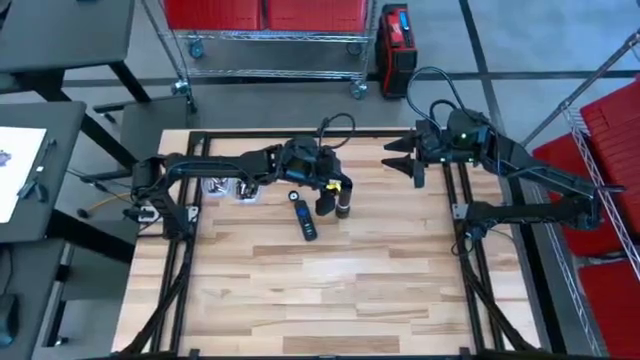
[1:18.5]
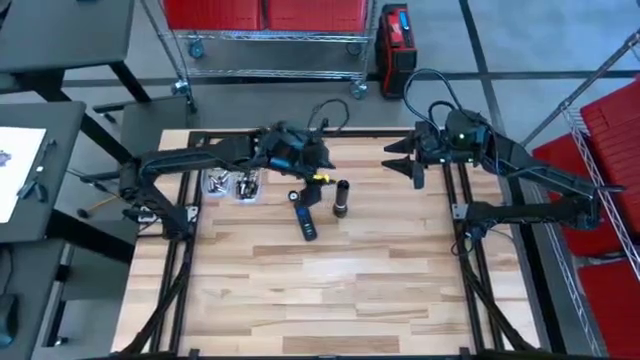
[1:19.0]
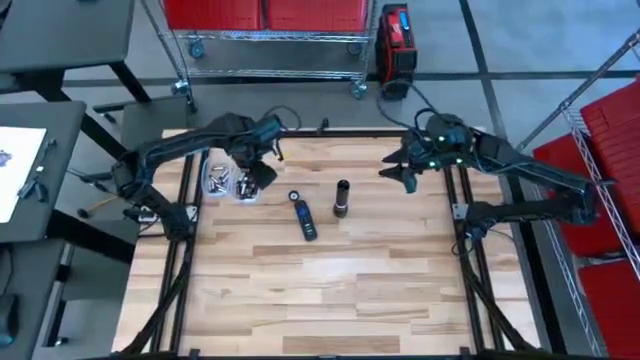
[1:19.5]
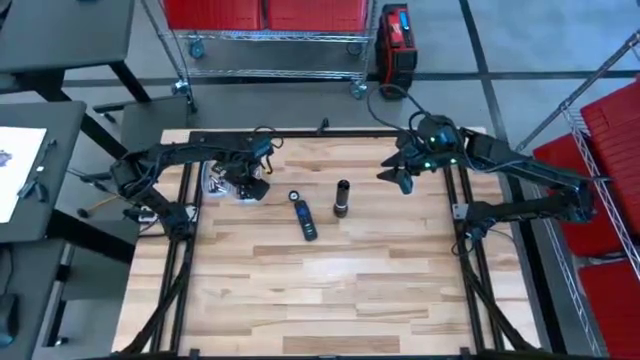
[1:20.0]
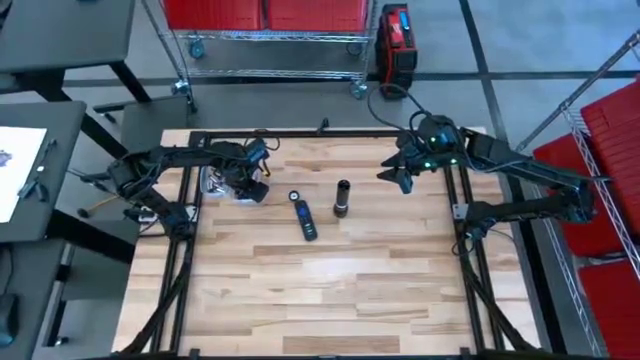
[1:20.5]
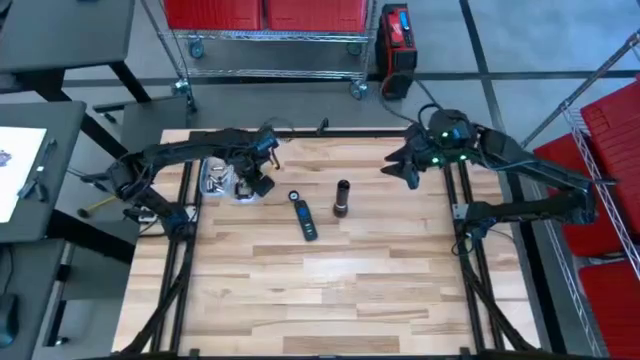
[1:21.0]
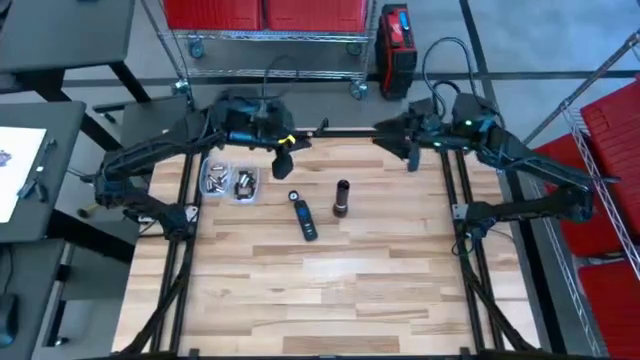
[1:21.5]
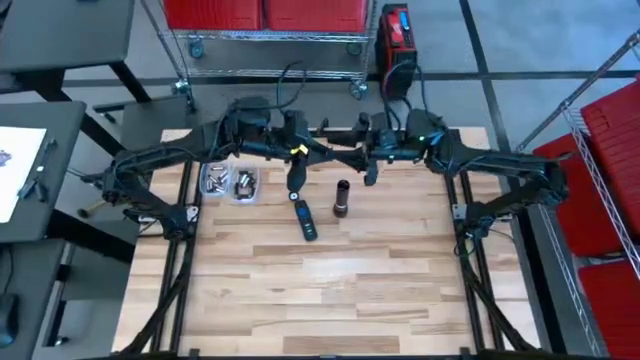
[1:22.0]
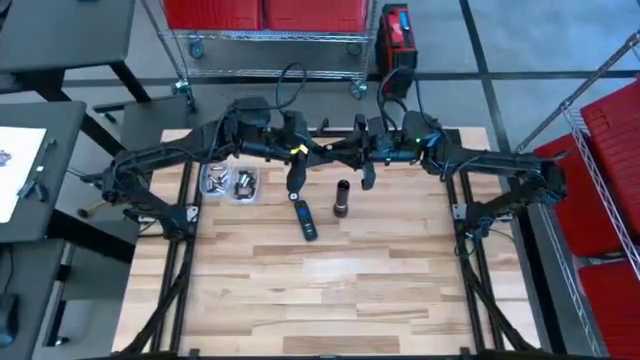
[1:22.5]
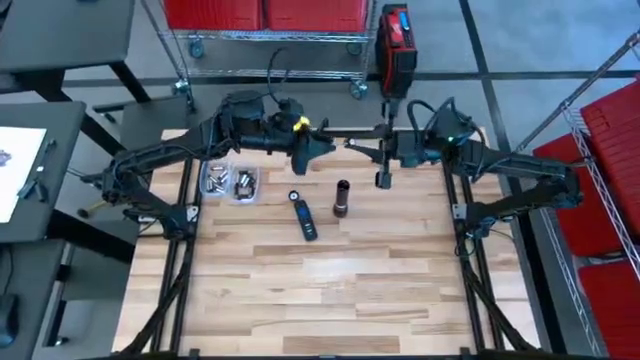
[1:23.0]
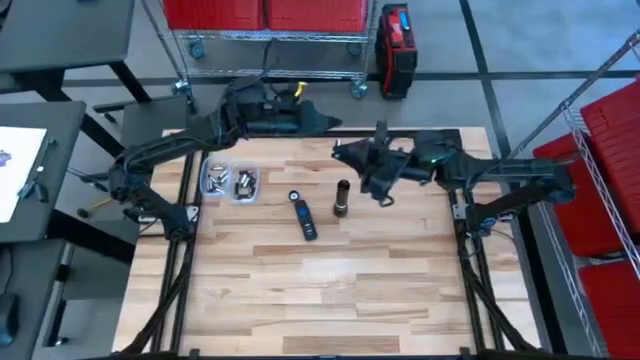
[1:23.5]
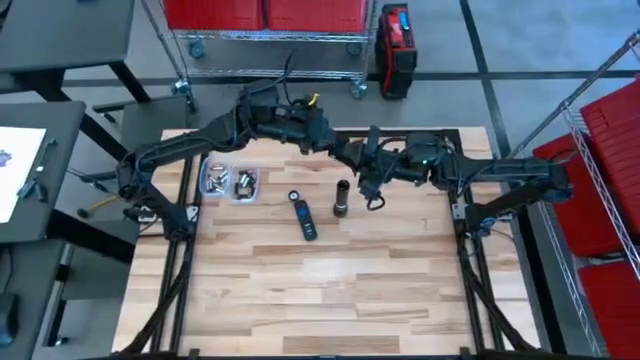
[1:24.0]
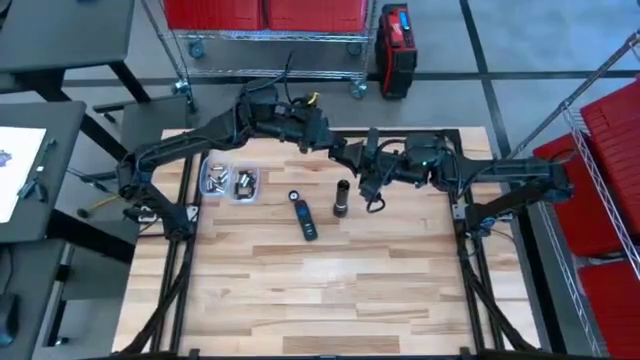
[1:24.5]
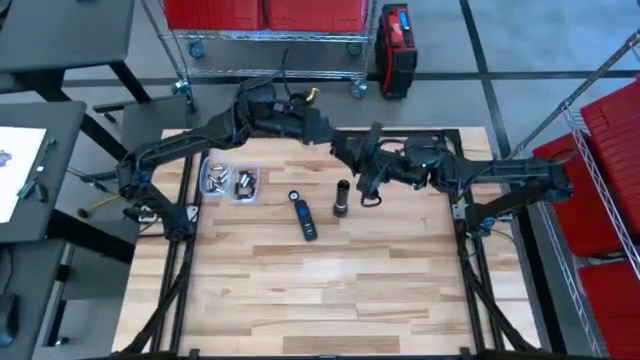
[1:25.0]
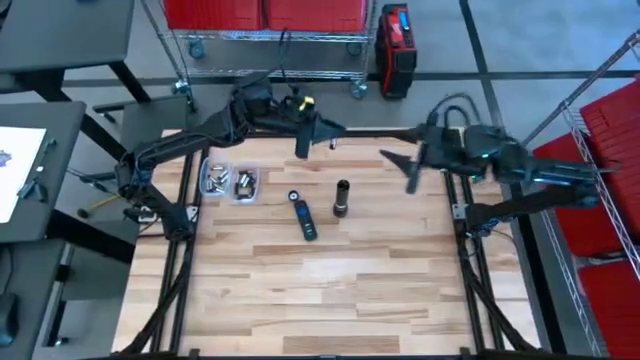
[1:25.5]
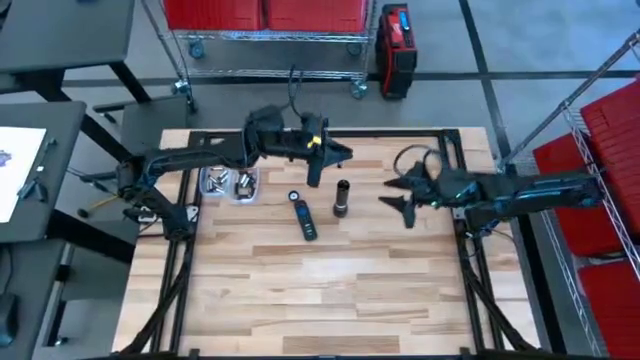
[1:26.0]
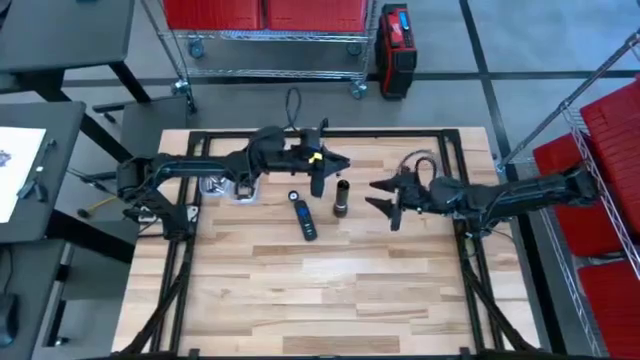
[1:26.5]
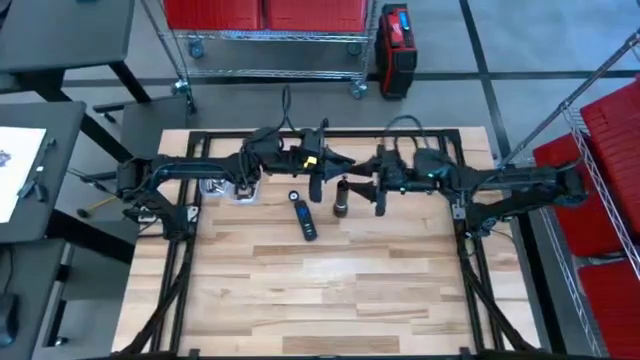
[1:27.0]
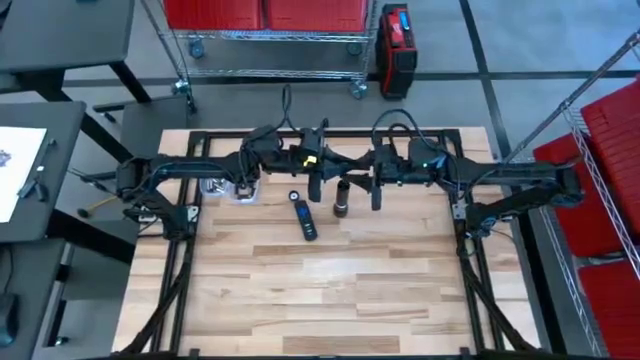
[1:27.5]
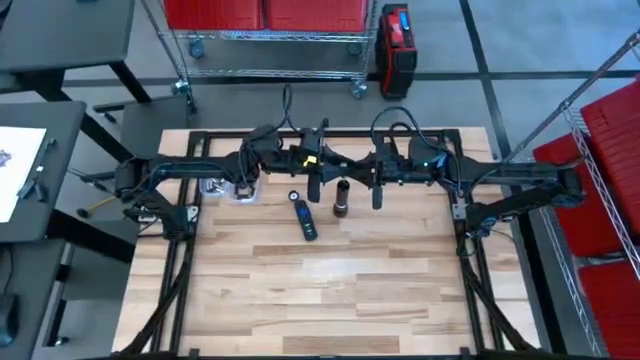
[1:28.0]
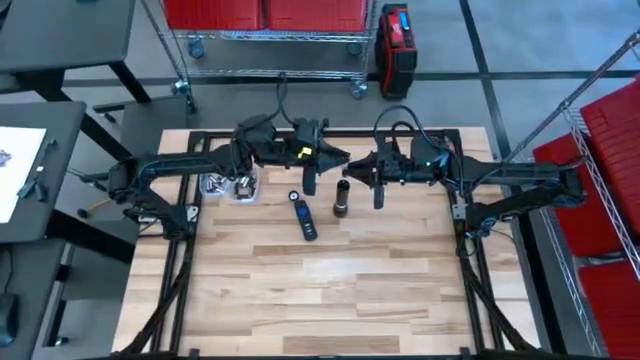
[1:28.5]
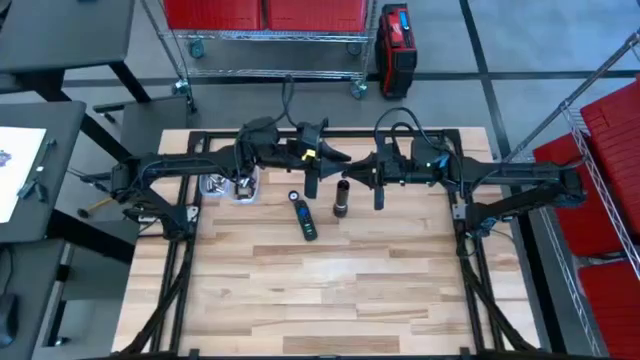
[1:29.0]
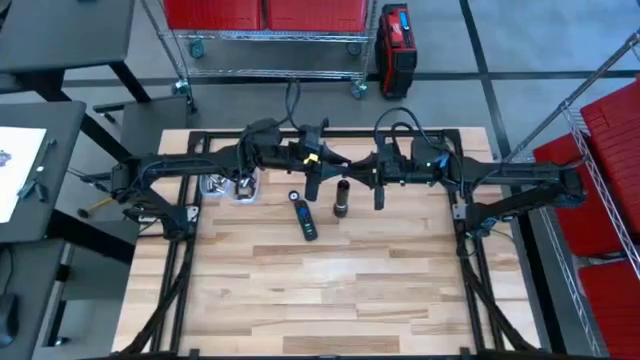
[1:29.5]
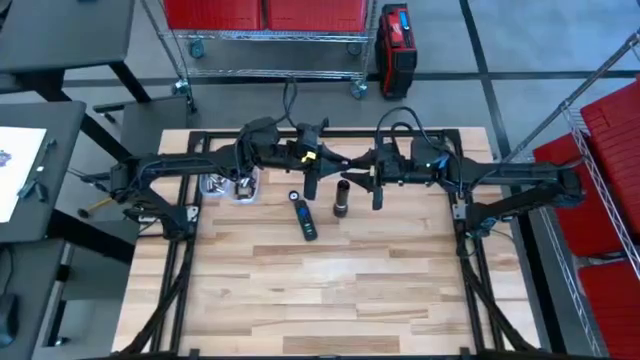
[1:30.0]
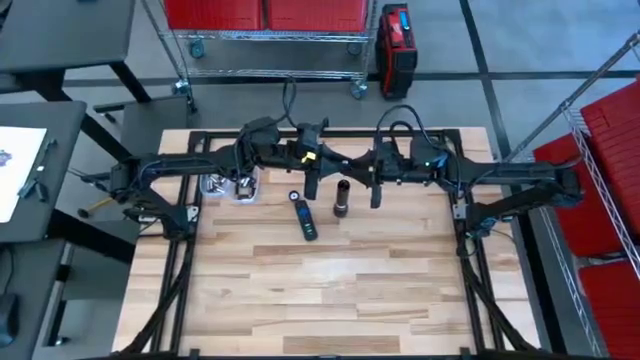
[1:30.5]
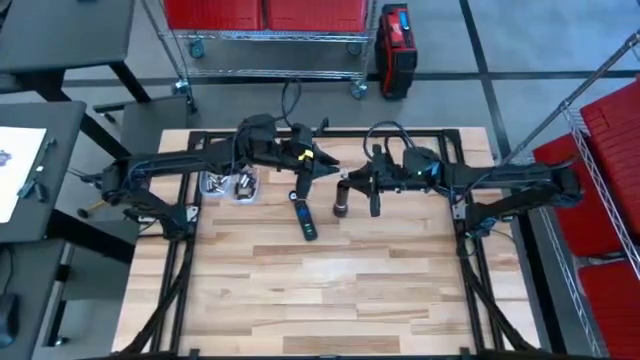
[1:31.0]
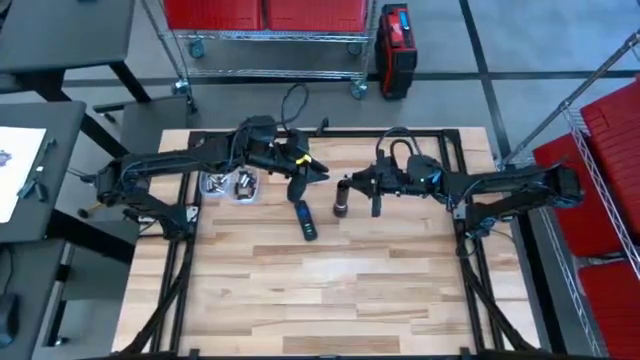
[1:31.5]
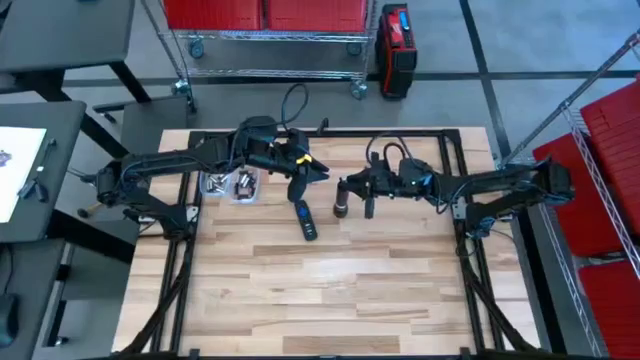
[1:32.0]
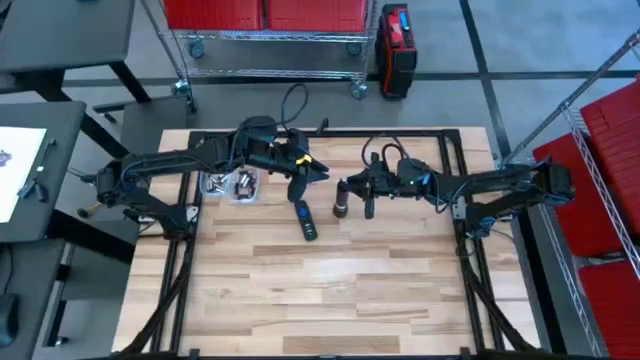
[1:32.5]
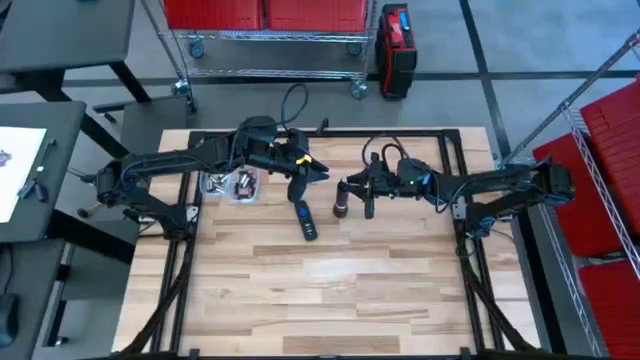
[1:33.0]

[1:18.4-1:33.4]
Task: Insert battery
Insert the silver battery into the flashlight's battery compartment

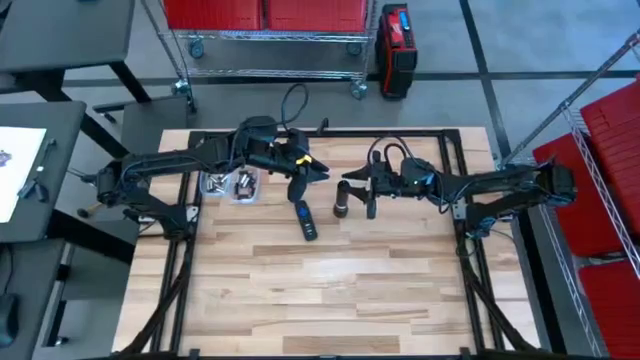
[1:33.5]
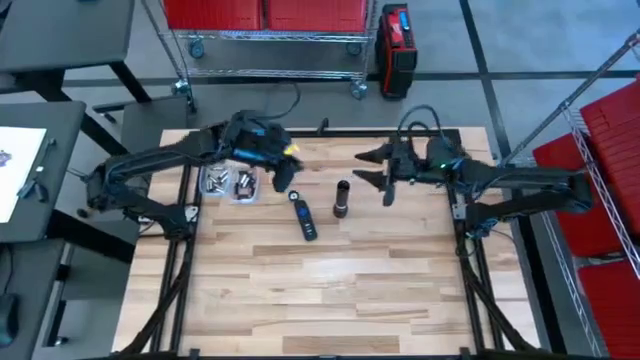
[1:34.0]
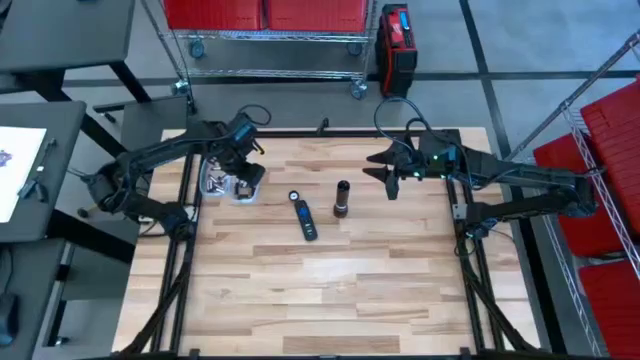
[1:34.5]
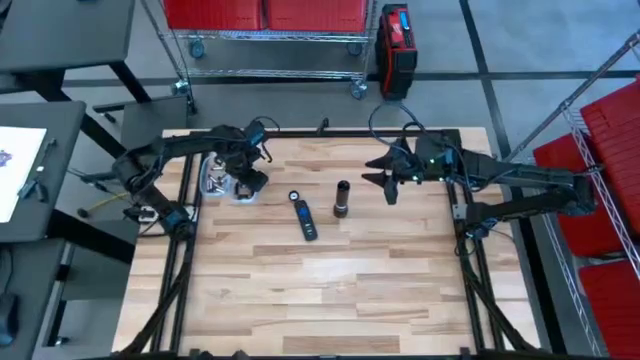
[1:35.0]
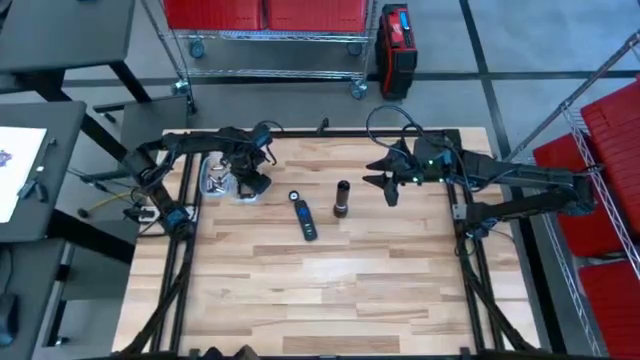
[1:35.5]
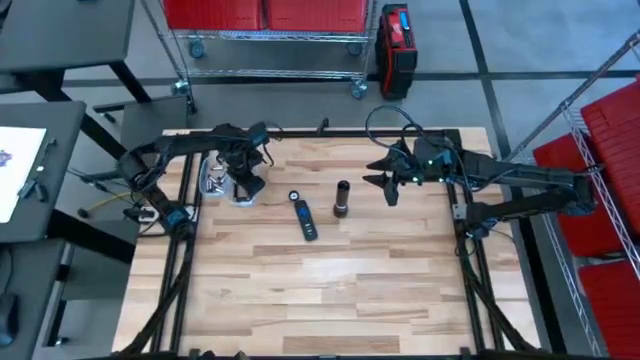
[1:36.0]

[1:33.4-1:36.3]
Insert the silver battery into the flashlight's battery compartment

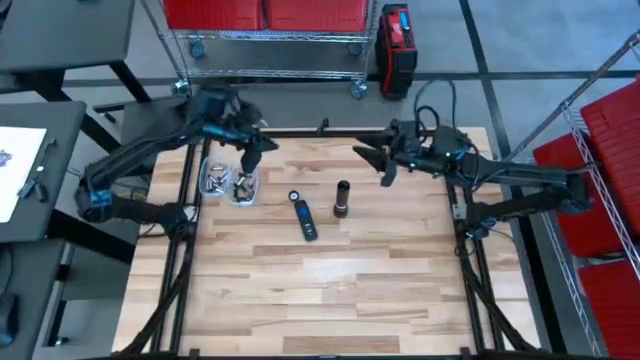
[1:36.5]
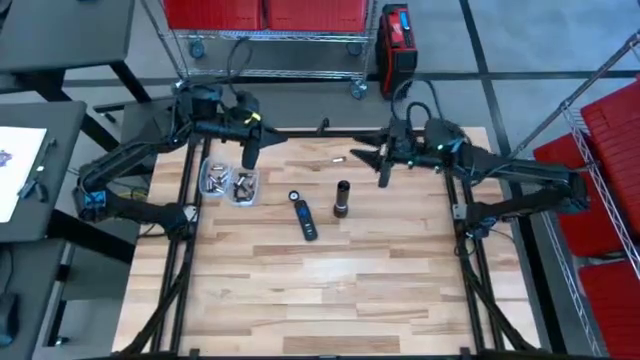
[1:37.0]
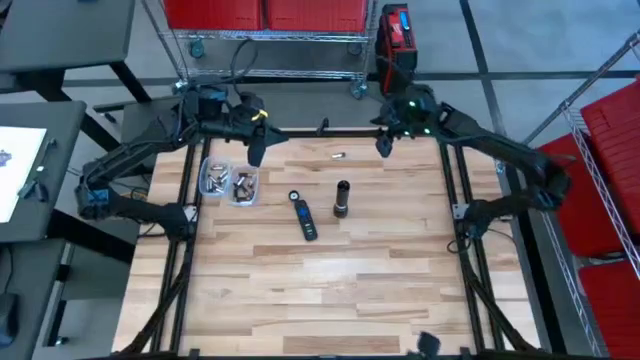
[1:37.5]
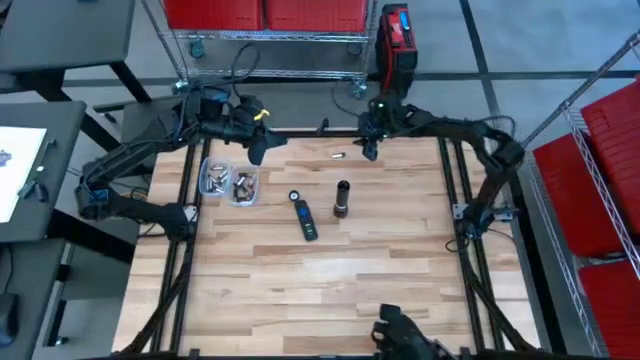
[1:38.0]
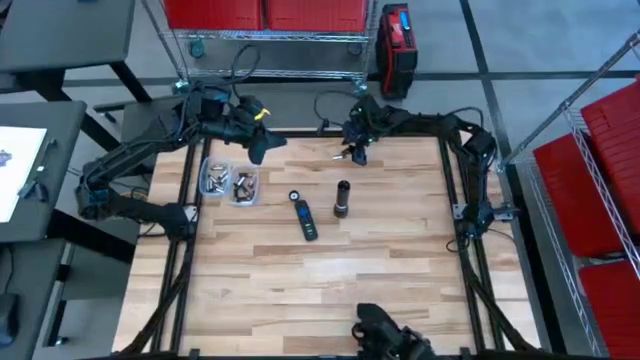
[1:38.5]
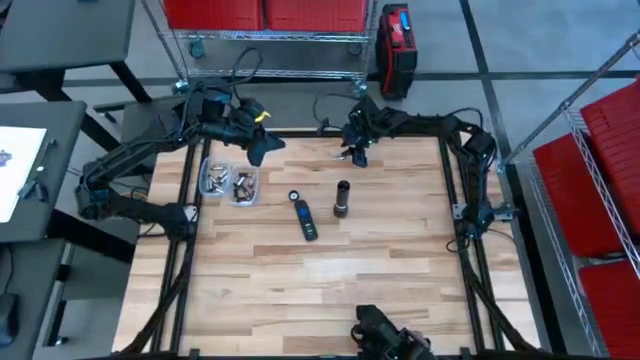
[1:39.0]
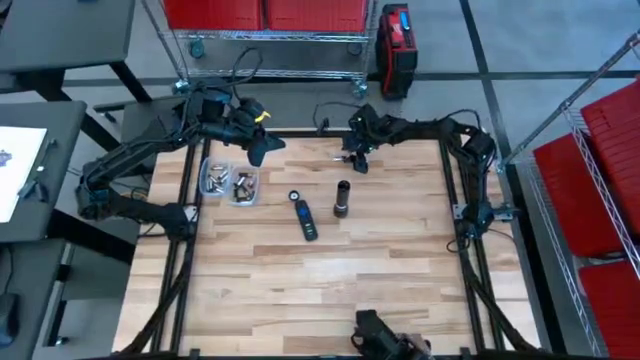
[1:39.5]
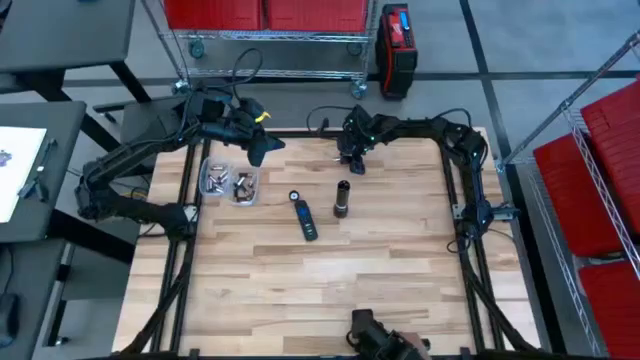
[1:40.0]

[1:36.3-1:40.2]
Insert the silver battery into the flashlight's battery compartment

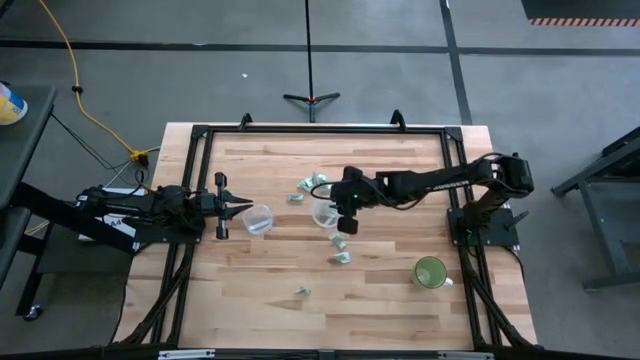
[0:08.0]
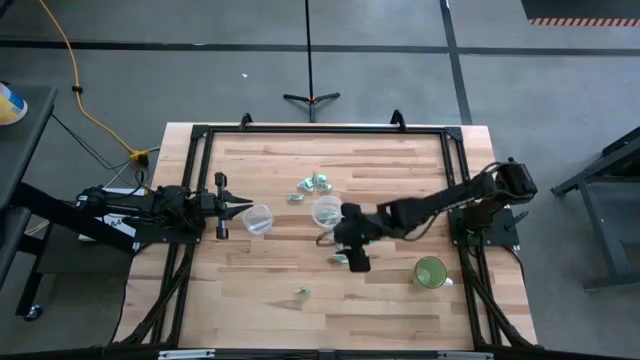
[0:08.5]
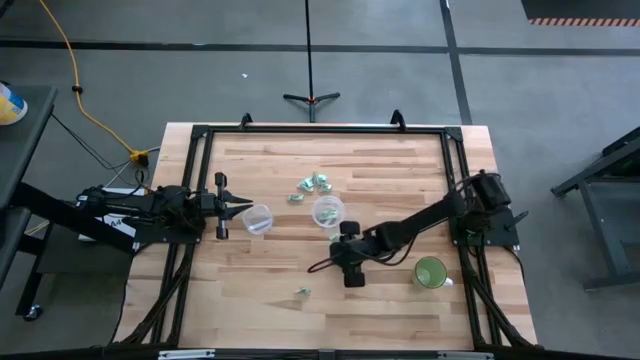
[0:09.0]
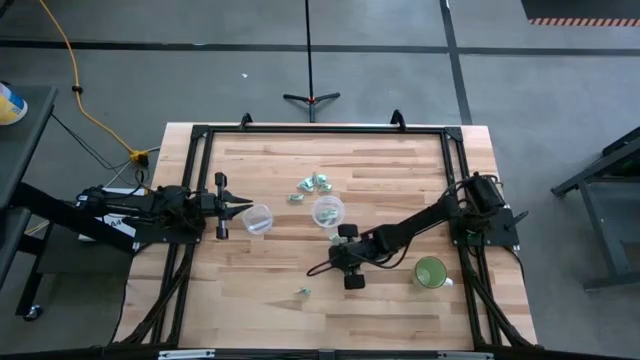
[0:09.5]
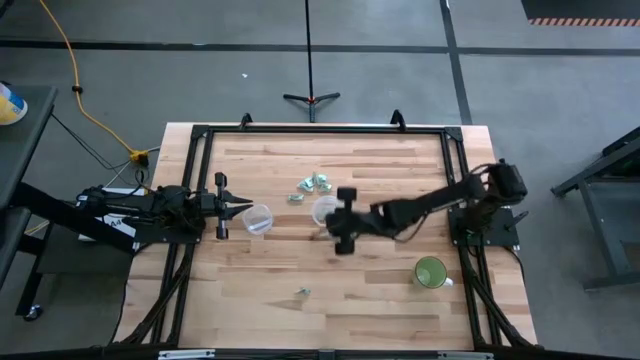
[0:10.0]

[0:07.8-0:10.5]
Task: Pick and place Stevia / Truvia into bins
Put the white stevia packet into the right transparent container
